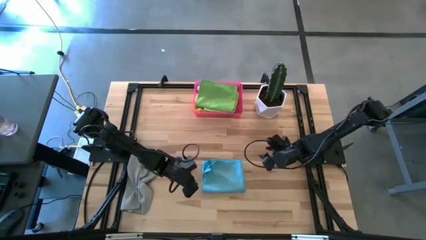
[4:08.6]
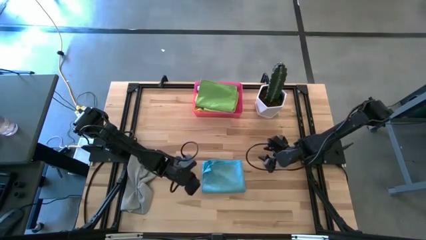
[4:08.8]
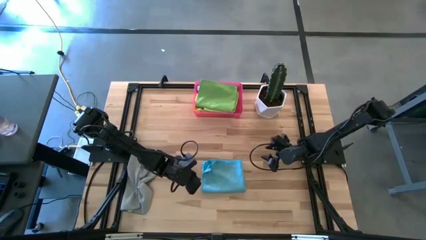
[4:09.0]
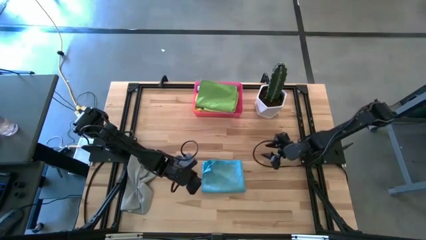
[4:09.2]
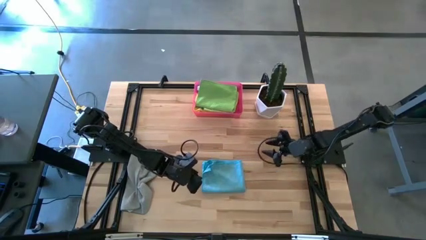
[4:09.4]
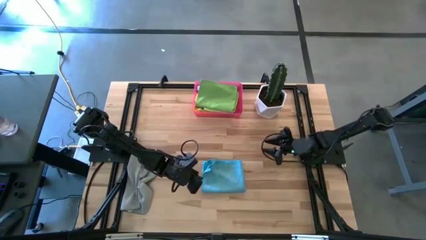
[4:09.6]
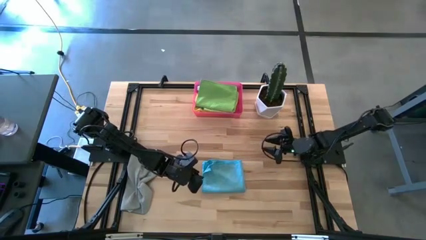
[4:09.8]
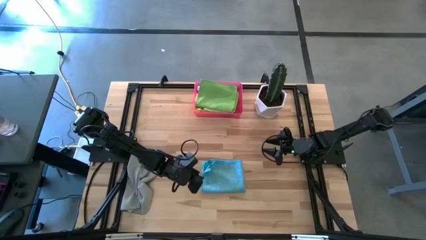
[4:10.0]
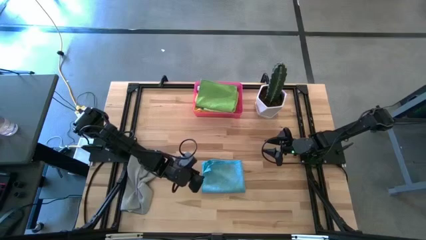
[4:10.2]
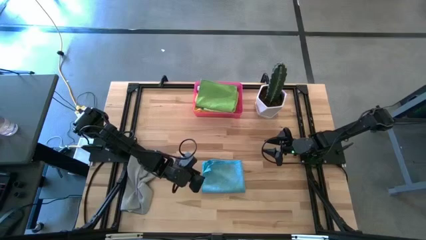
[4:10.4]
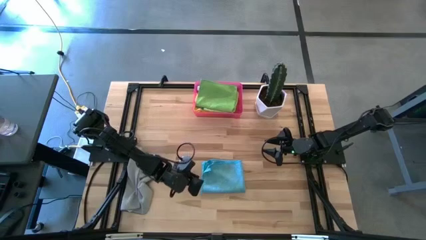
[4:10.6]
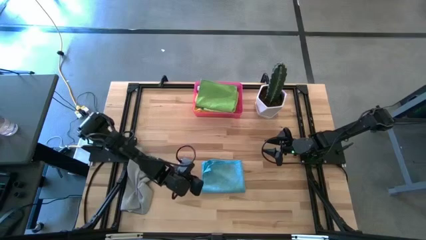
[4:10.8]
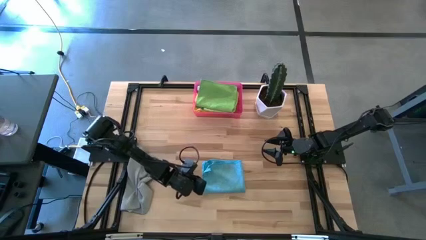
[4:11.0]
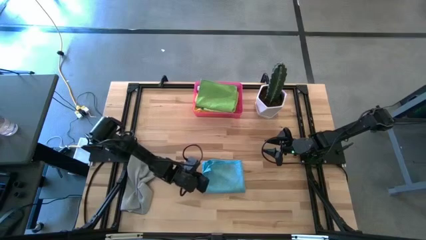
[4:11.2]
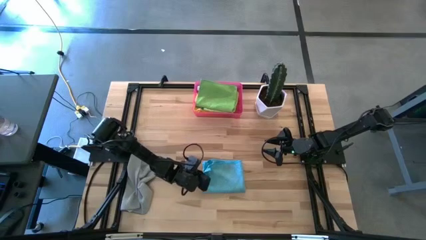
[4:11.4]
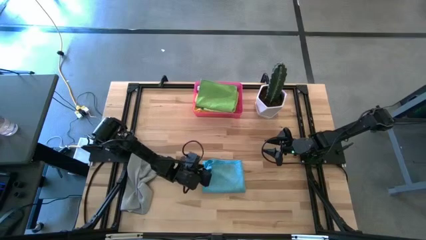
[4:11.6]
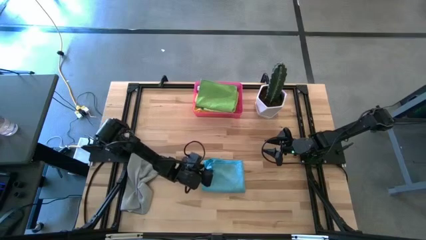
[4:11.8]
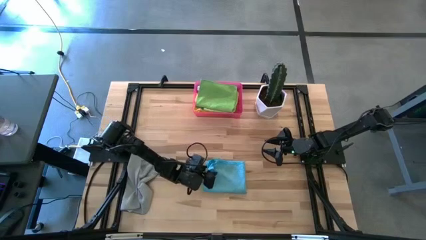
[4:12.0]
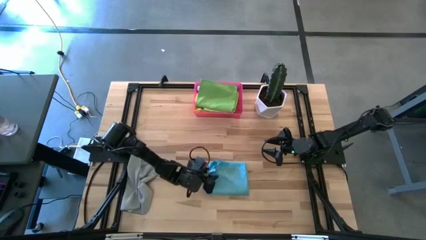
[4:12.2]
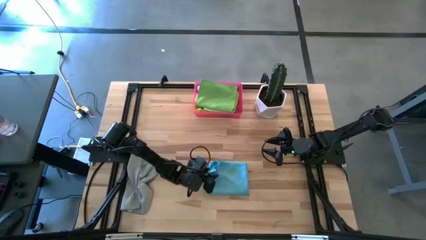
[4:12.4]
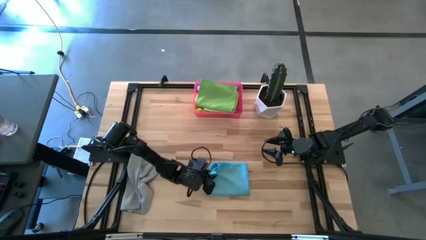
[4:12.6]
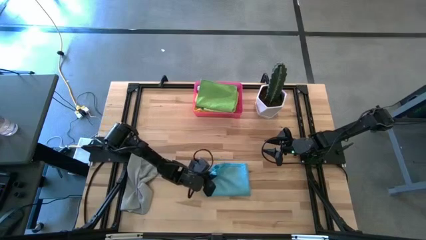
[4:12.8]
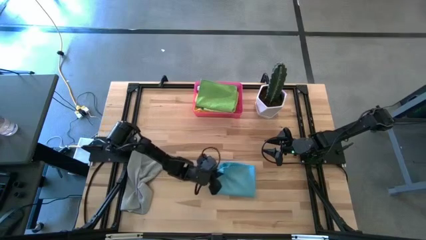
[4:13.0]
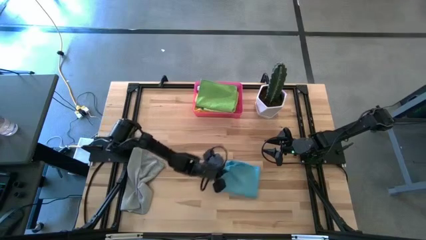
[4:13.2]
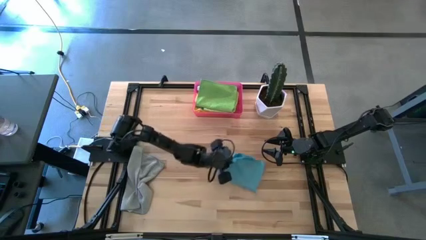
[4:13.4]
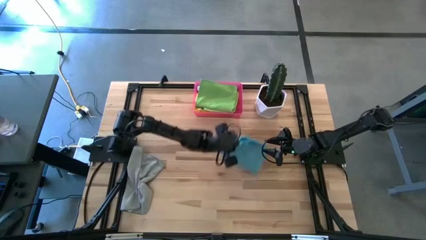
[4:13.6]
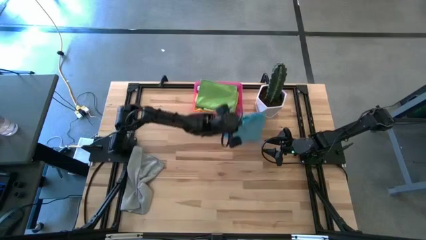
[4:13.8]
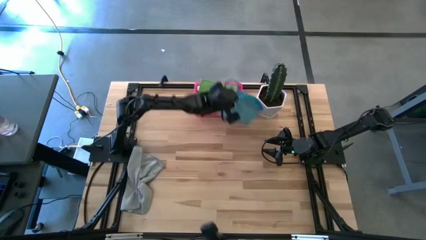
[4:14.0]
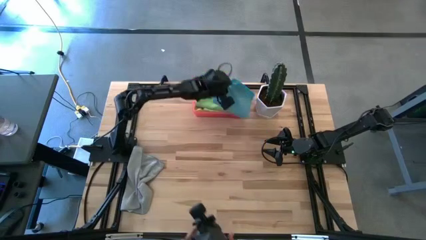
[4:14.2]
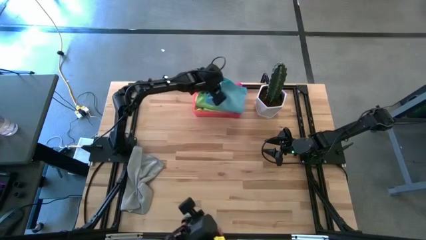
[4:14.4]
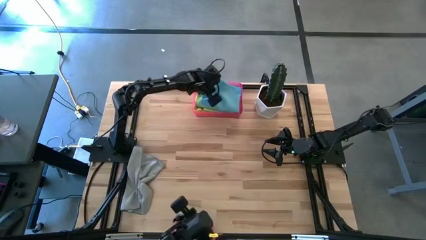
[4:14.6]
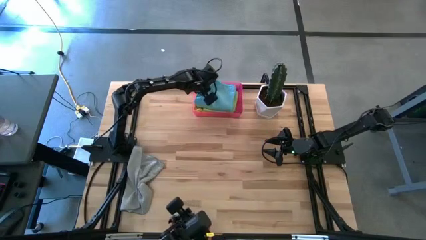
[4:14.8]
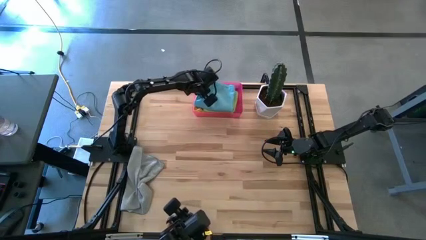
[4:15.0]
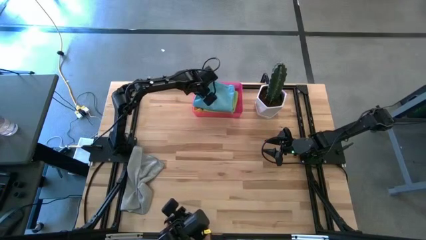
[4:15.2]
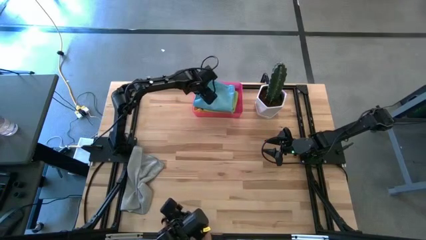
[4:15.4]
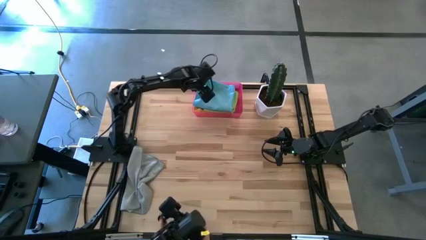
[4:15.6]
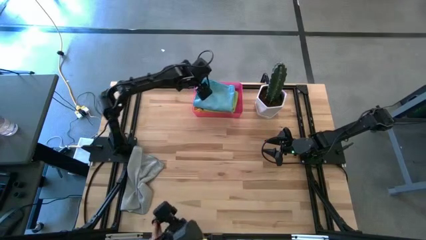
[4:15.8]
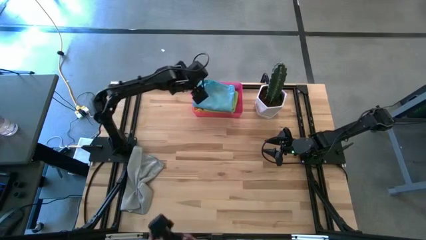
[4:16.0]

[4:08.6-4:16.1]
Task: Fold microfiber towels
Put the blue microfiber cloth into the pink bin

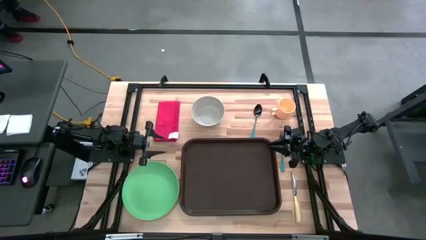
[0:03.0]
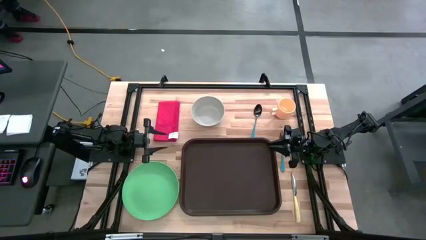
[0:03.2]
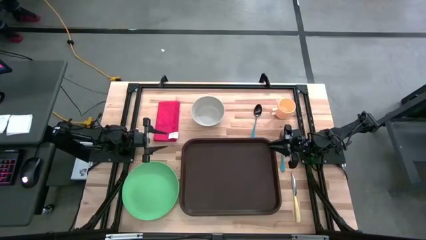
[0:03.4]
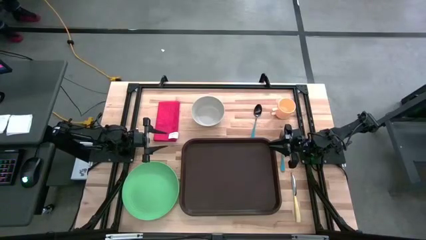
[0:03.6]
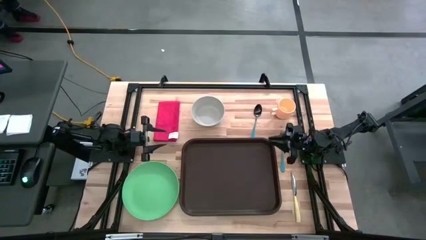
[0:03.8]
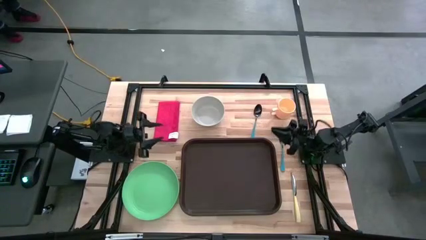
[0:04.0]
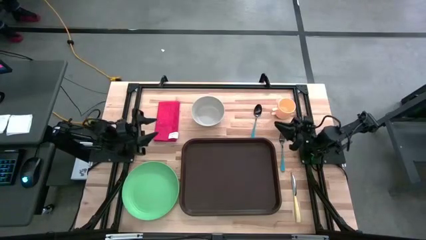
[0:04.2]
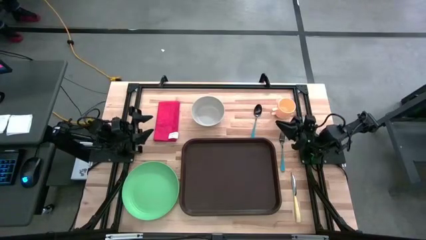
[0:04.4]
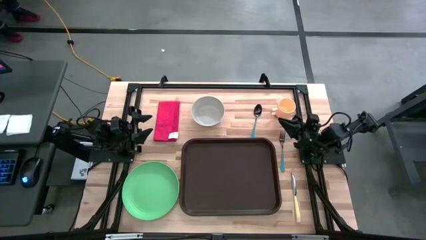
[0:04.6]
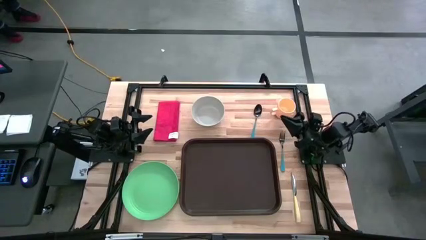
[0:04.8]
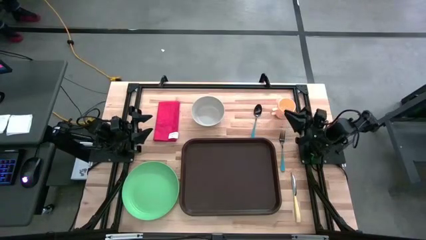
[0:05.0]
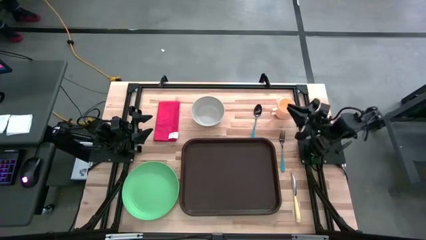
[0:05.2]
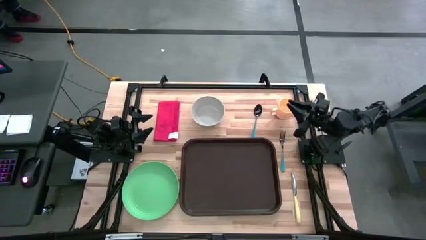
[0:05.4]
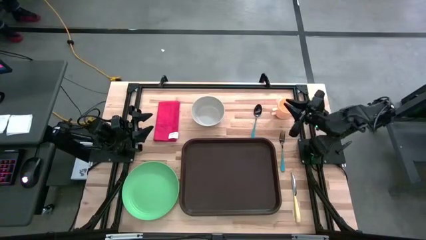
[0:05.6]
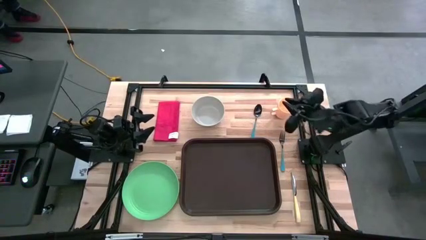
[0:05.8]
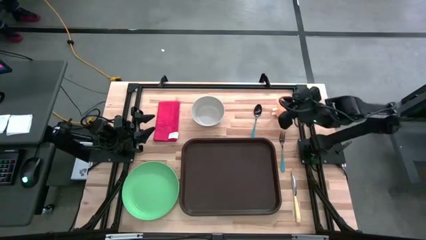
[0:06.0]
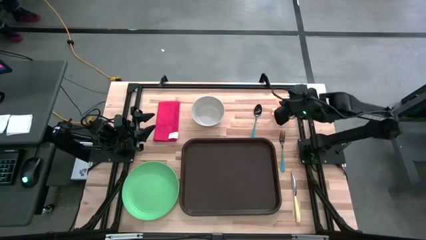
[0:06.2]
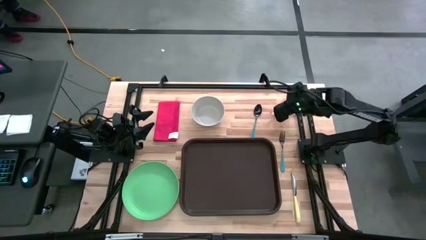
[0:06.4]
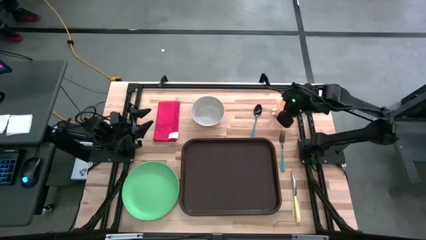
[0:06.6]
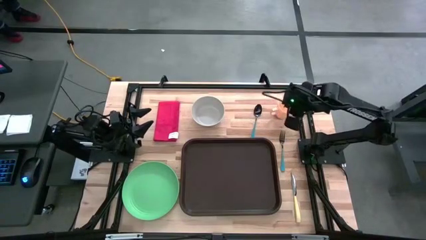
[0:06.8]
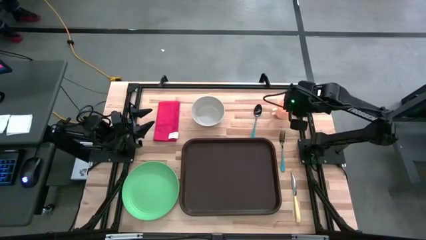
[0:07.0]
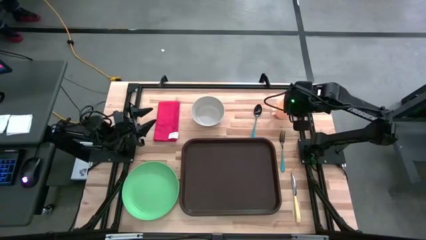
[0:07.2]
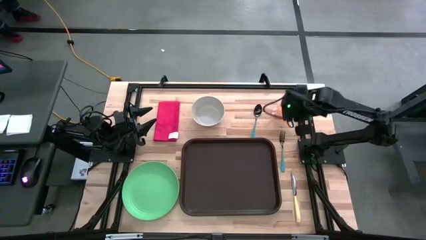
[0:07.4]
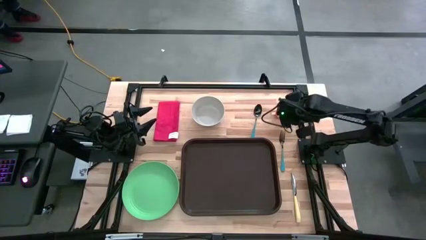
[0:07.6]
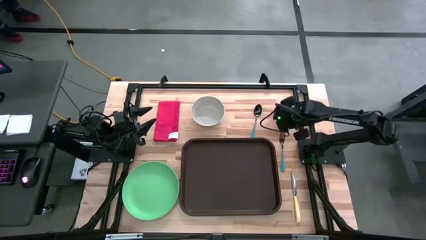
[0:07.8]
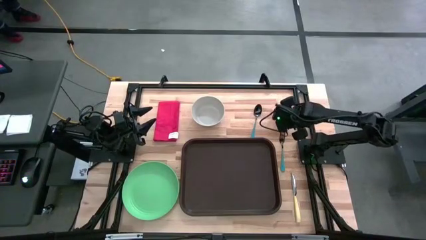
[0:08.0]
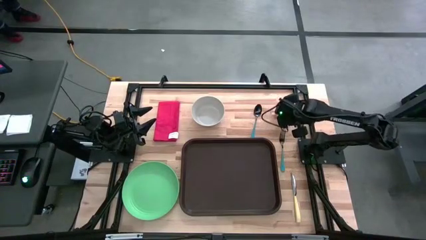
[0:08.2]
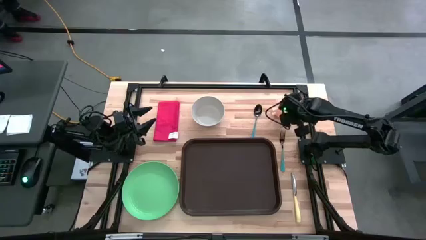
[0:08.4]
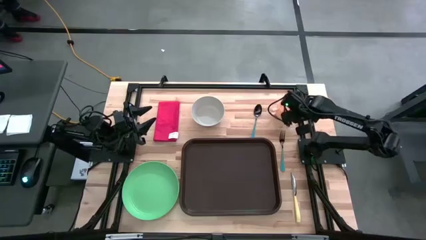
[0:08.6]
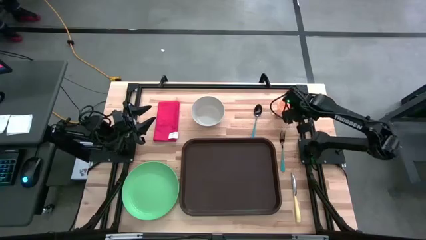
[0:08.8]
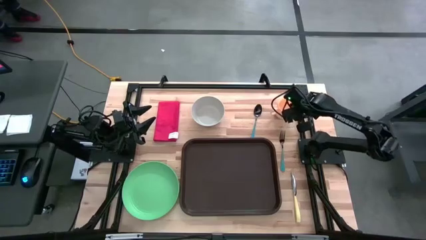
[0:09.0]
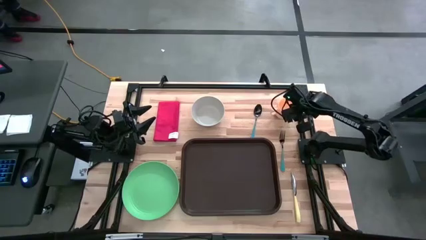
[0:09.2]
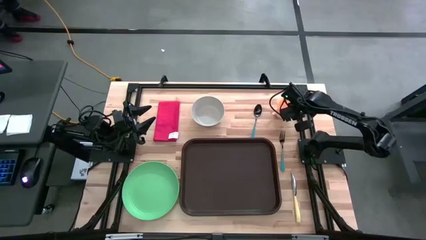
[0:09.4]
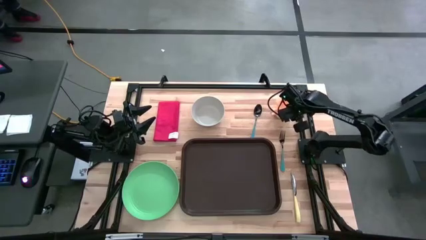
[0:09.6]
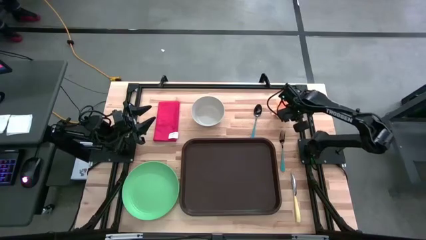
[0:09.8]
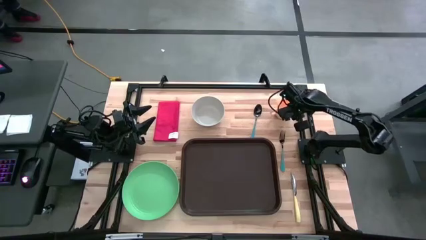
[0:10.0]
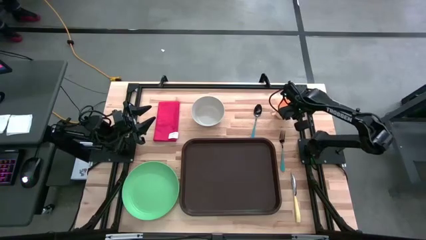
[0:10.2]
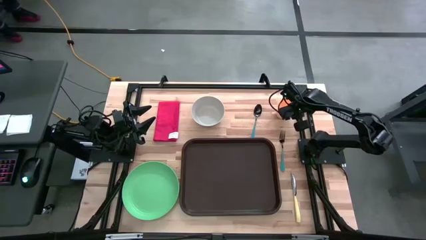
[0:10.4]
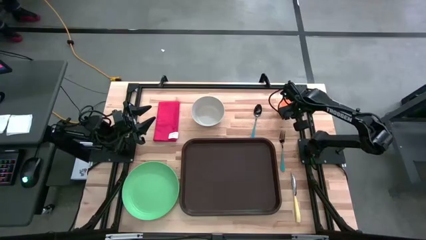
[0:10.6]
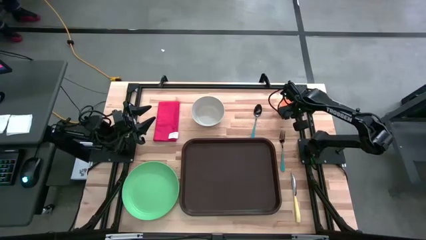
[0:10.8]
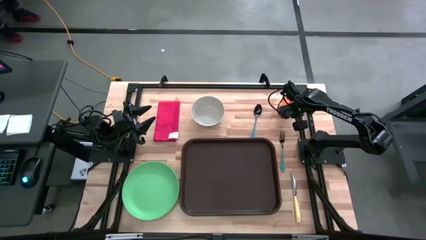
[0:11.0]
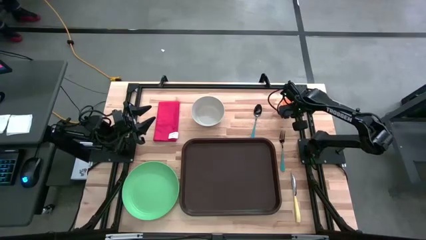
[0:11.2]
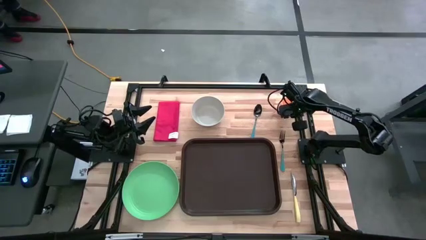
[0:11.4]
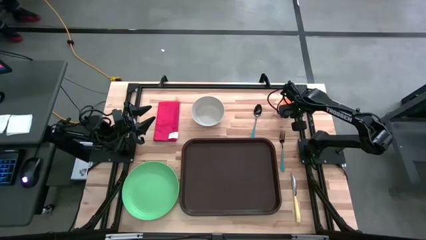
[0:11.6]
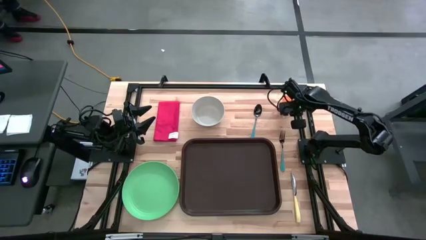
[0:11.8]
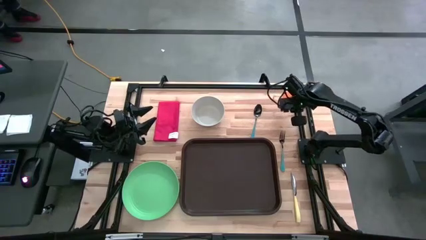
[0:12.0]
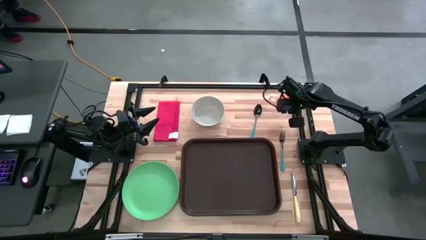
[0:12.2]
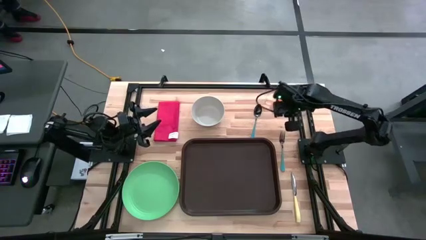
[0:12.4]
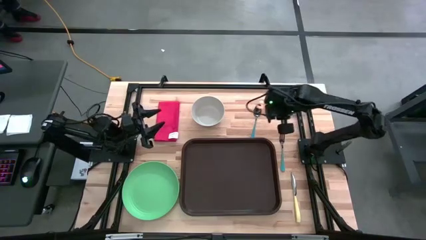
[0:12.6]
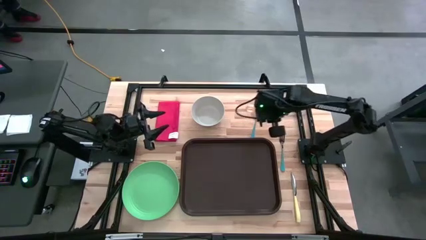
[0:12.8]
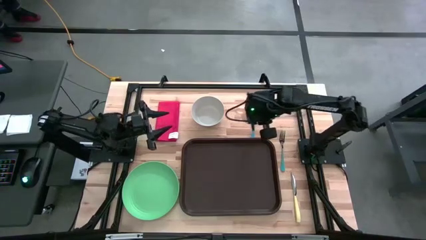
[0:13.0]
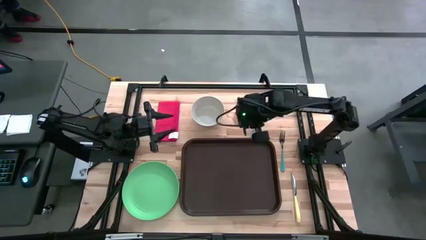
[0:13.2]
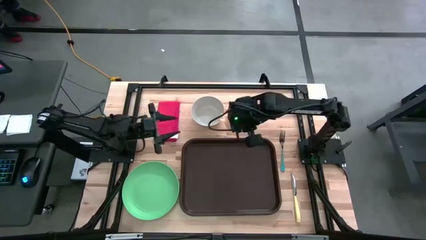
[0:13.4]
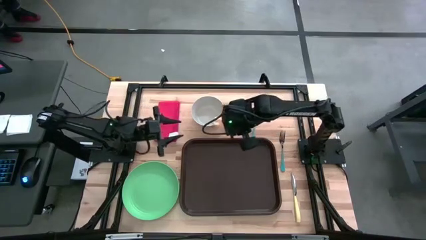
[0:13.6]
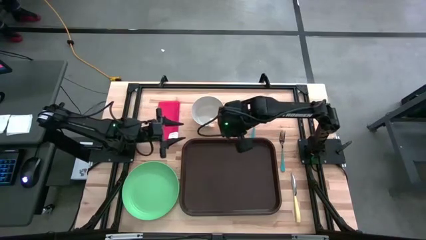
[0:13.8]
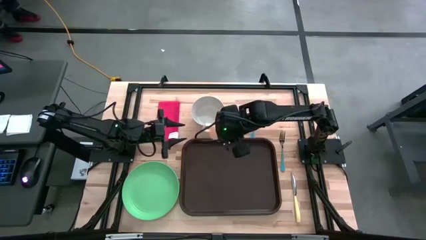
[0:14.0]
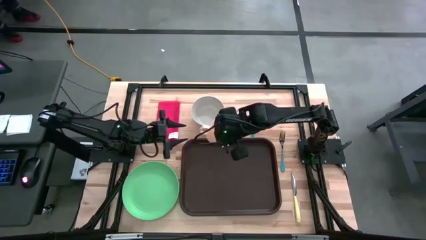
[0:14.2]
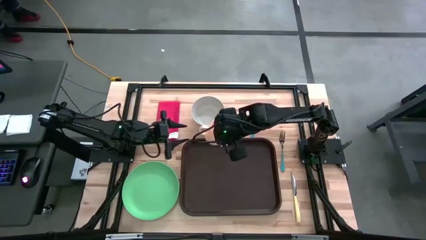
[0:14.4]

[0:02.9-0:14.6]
Task: Set up tray
Put the yellow cup on the top left of the brown serving tray
